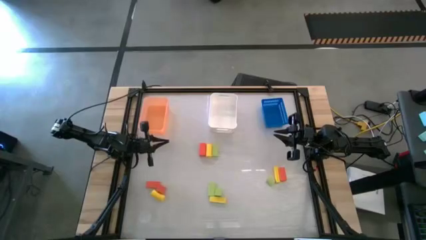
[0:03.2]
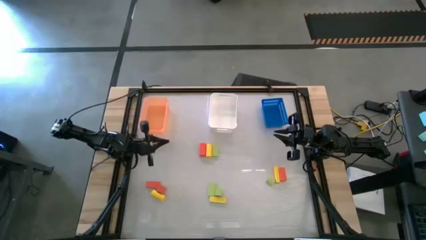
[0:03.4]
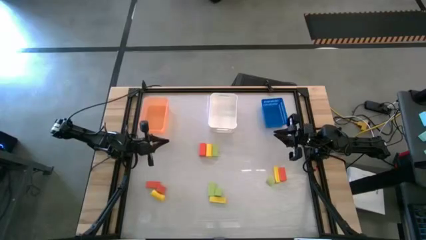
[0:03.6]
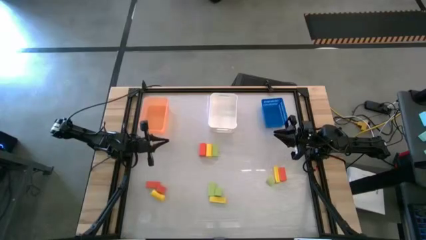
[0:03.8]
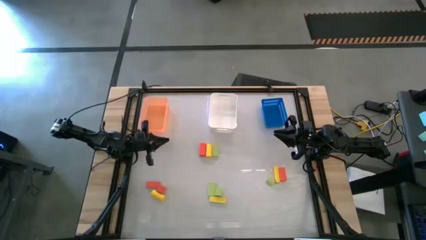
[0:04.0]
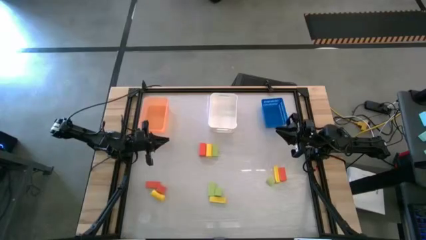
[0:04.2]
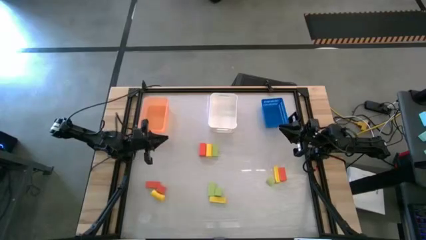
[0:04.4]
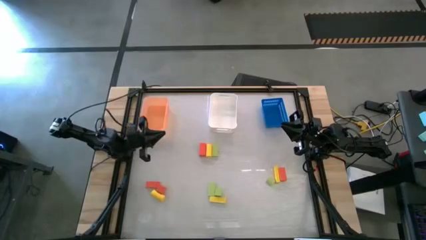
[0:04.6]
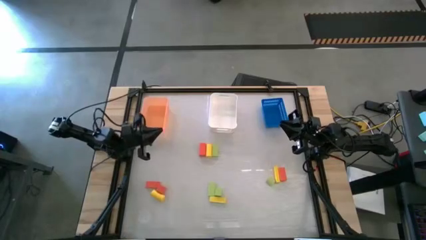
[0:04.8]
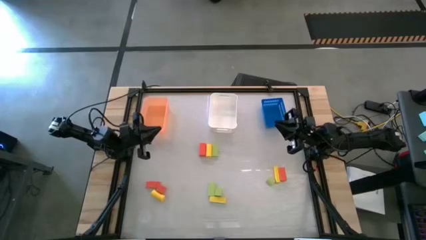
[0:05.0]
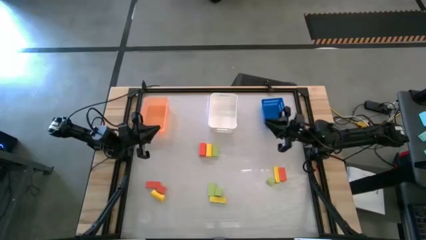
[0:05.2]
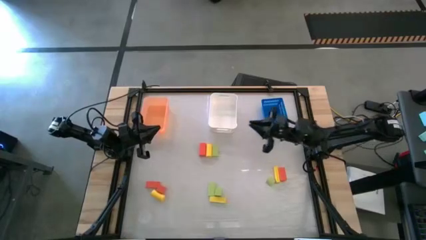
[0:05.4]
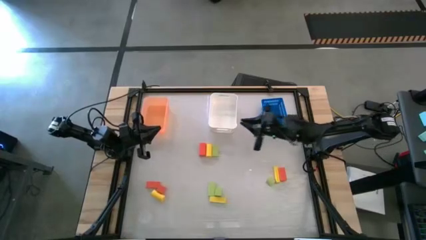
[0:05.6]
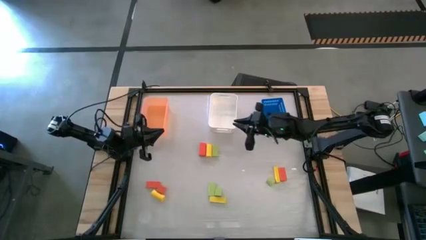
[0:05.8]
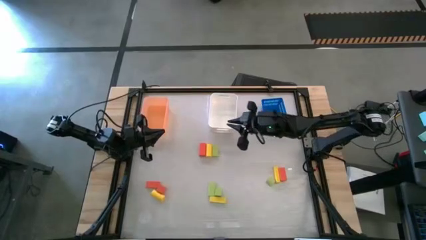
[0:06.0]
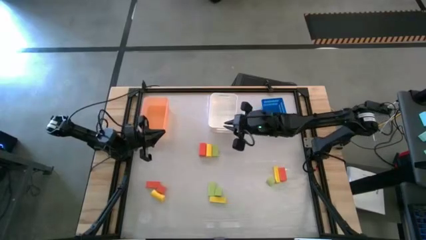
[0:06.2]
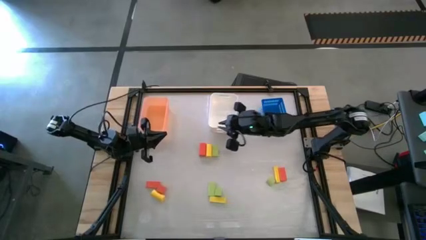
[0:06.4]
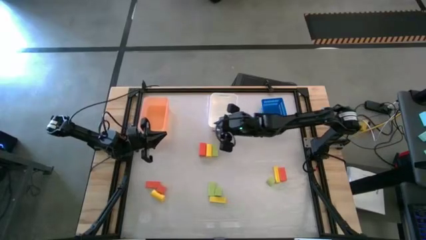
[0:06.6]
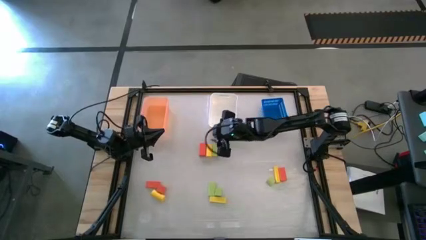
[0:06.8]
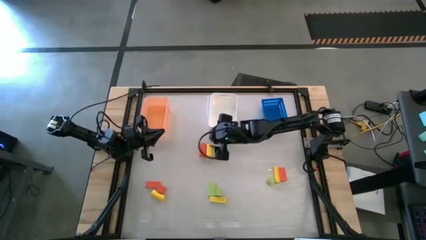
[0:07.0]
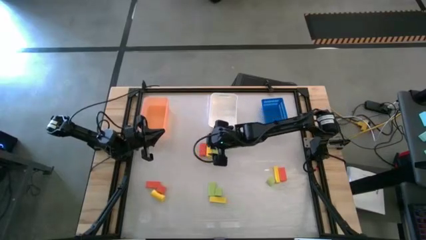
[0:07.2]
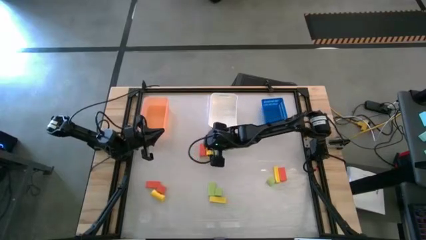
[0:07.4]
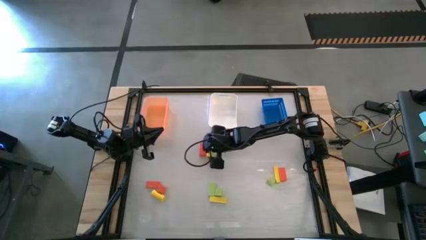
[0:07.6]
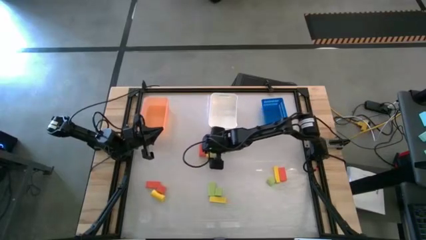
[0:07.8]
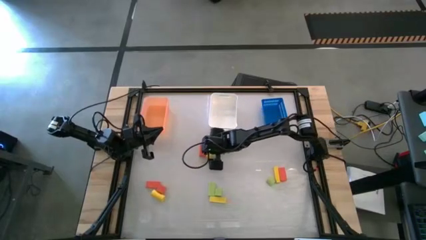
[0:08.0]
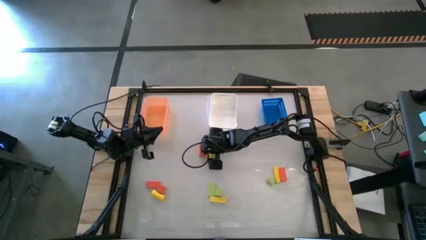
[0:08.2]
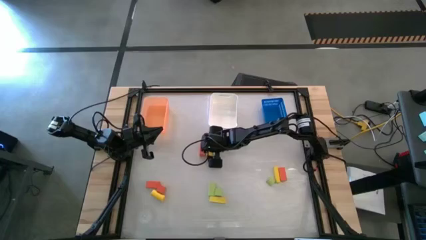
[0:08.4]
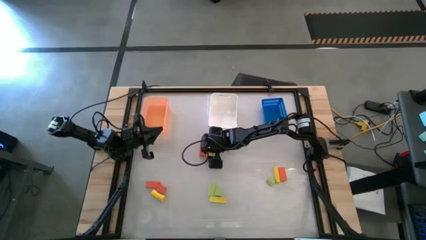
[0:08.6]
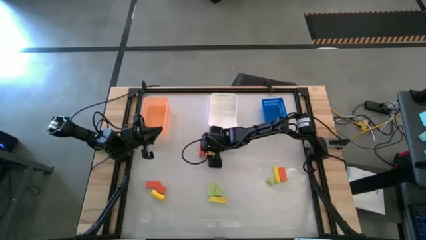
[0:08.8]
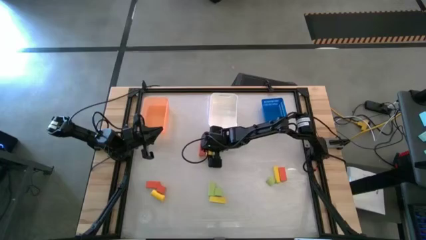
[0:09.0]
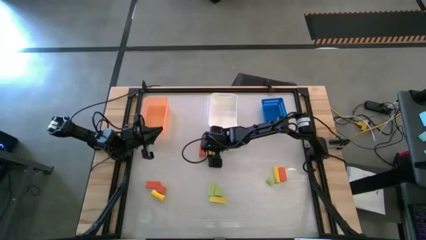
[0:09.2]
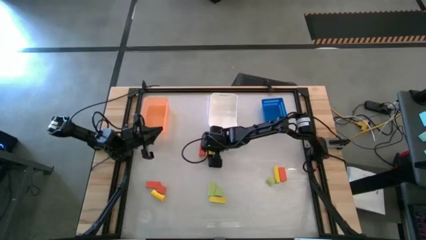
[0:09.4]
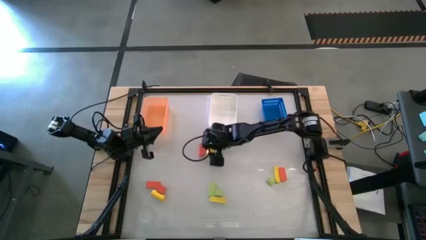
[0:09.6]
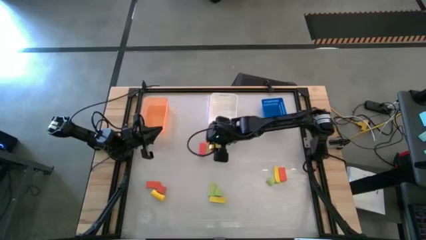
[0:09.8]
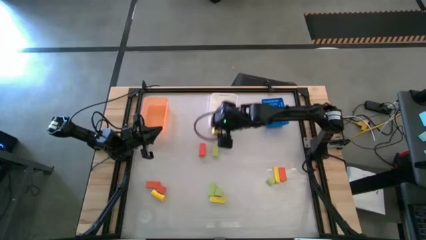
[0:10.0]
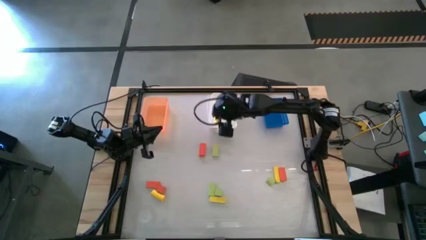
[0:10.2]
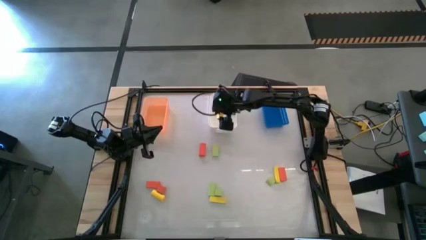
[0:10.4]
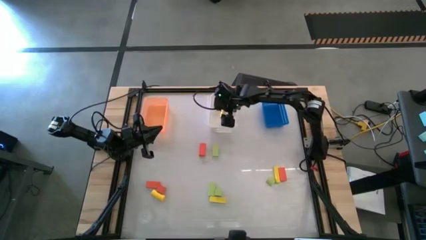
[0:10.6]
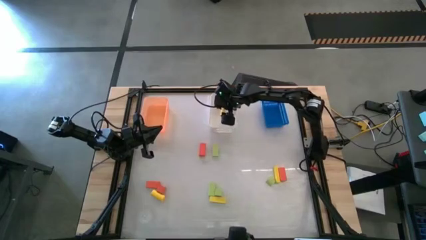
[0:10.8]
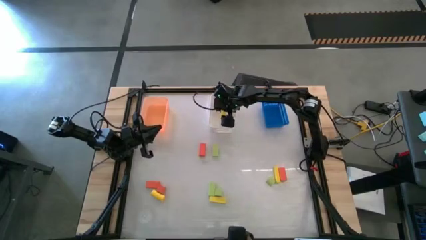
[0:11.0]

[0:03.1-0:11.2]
Task: Sort & place blocks by color
Put the top center yellow block into the white bin

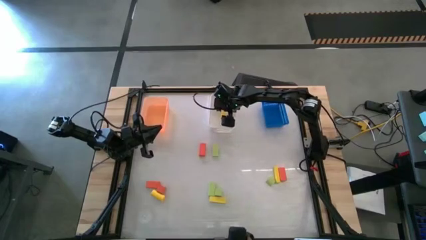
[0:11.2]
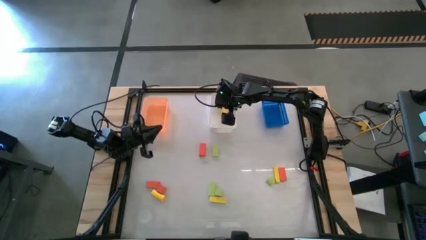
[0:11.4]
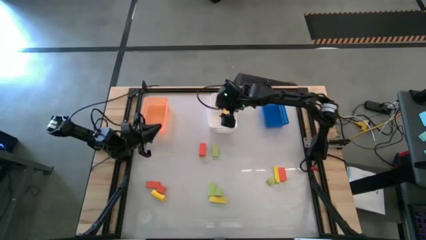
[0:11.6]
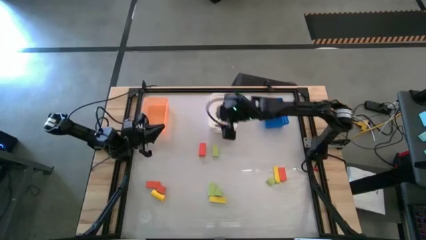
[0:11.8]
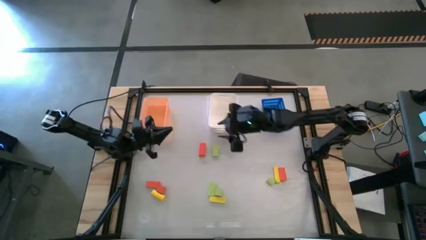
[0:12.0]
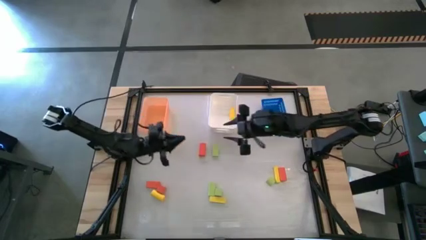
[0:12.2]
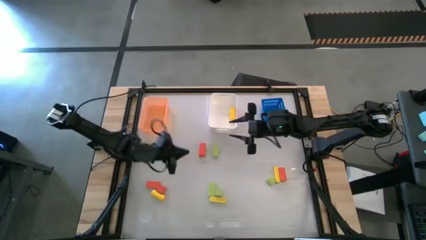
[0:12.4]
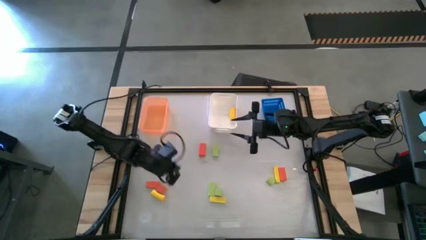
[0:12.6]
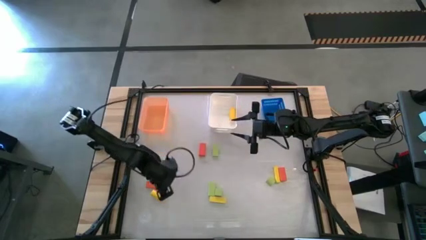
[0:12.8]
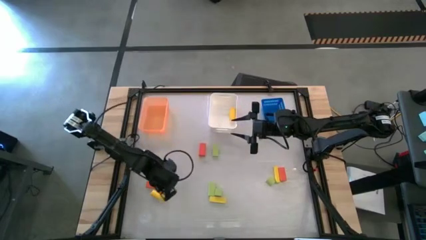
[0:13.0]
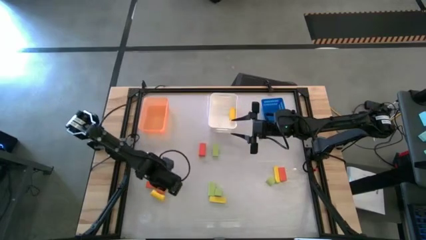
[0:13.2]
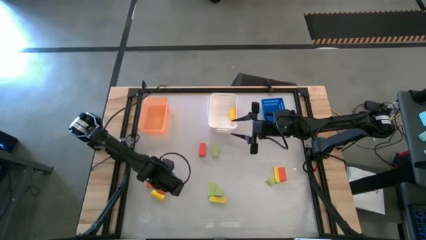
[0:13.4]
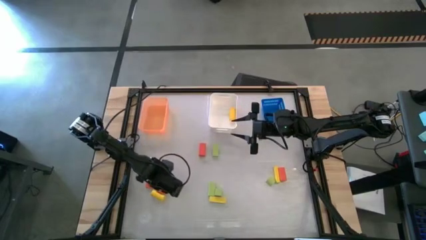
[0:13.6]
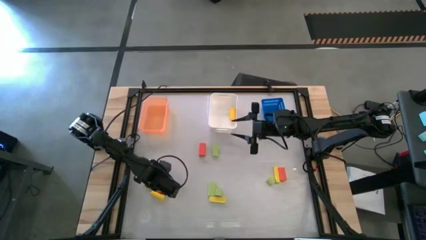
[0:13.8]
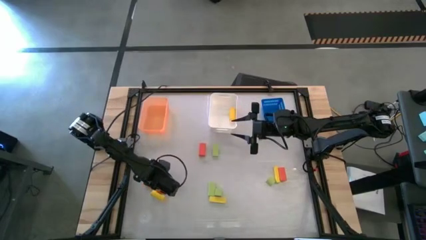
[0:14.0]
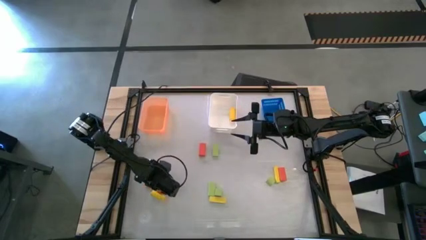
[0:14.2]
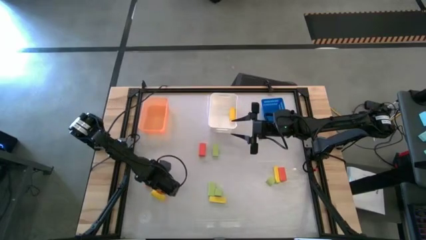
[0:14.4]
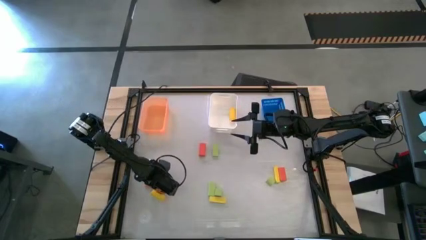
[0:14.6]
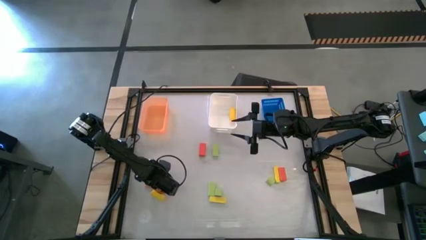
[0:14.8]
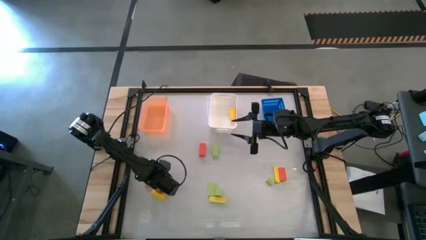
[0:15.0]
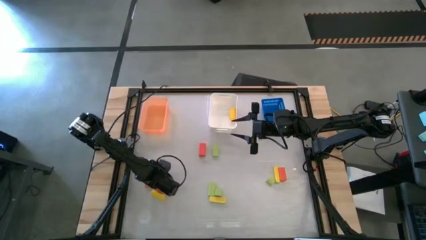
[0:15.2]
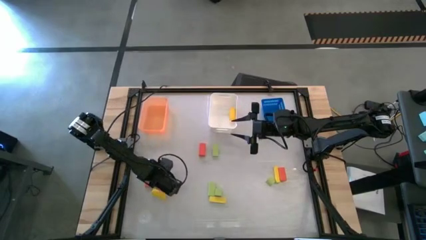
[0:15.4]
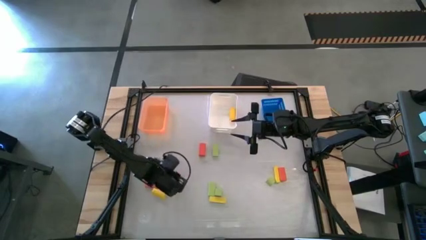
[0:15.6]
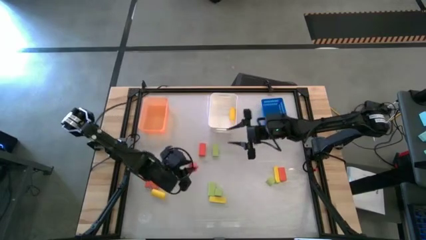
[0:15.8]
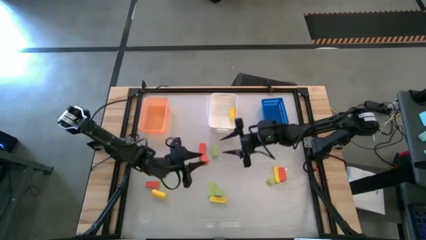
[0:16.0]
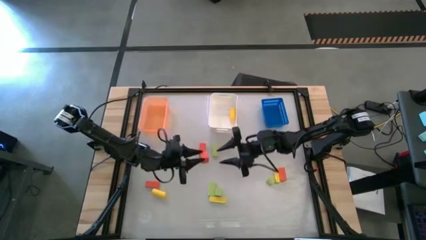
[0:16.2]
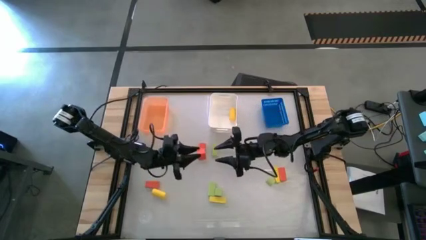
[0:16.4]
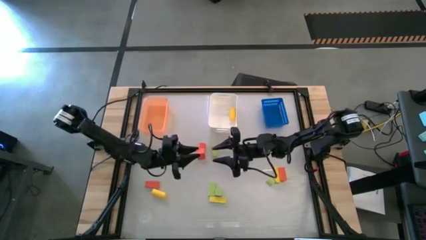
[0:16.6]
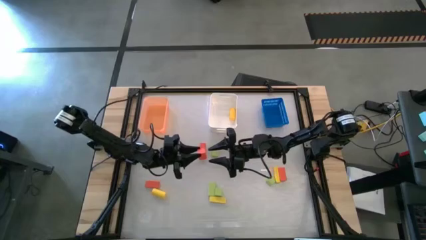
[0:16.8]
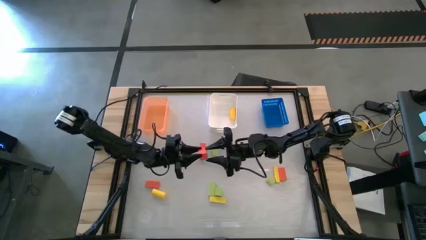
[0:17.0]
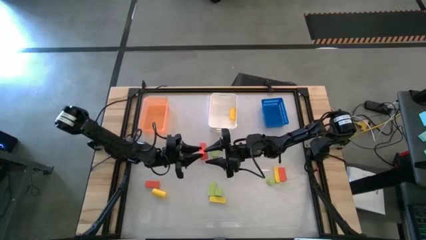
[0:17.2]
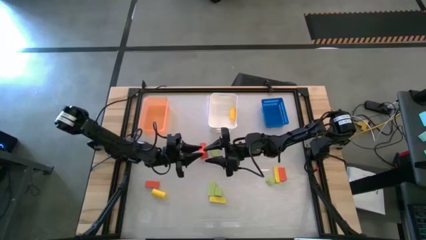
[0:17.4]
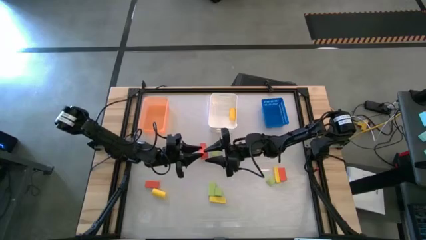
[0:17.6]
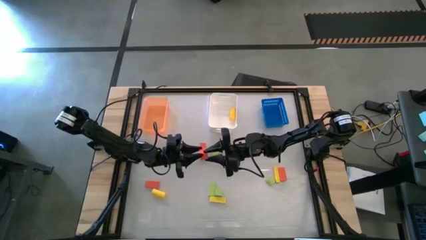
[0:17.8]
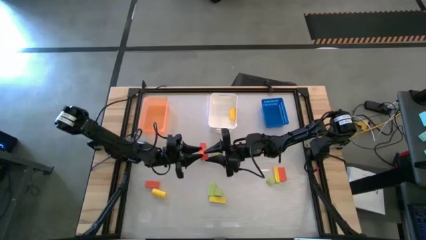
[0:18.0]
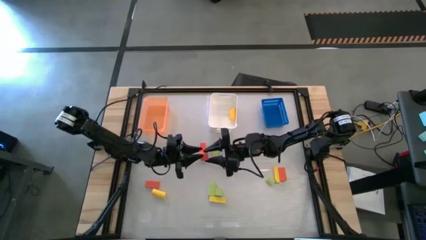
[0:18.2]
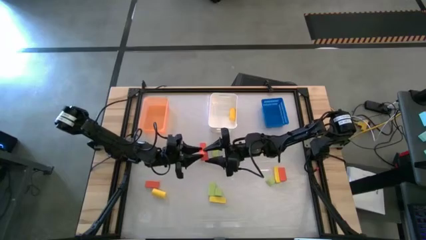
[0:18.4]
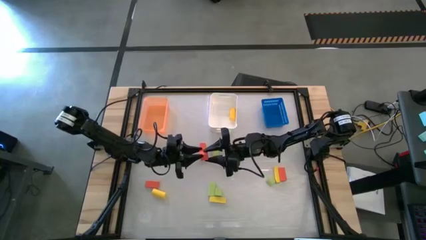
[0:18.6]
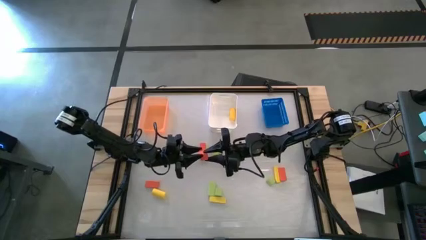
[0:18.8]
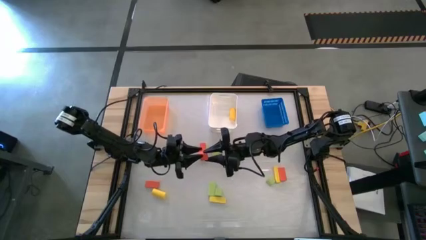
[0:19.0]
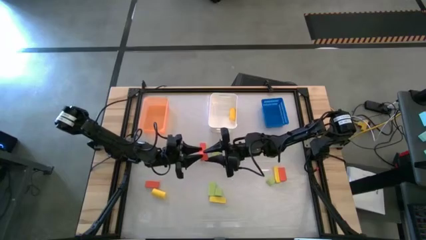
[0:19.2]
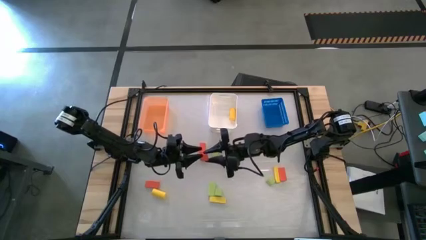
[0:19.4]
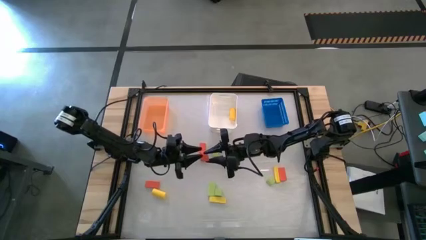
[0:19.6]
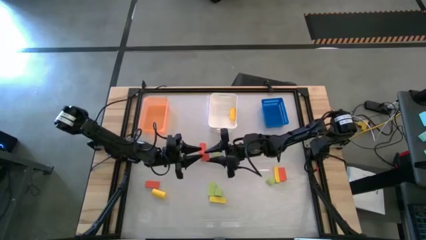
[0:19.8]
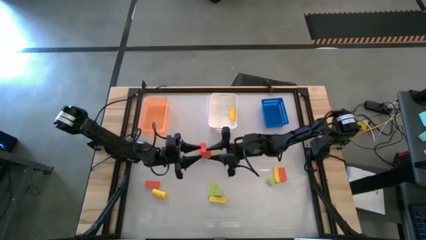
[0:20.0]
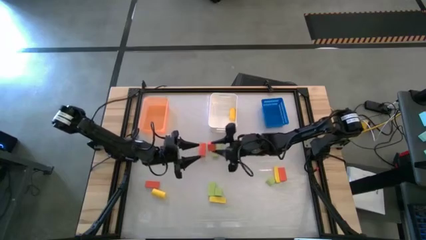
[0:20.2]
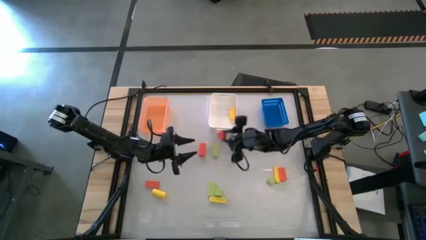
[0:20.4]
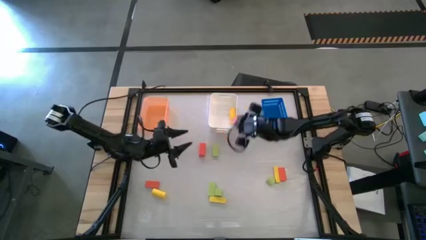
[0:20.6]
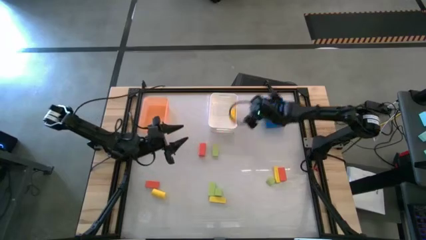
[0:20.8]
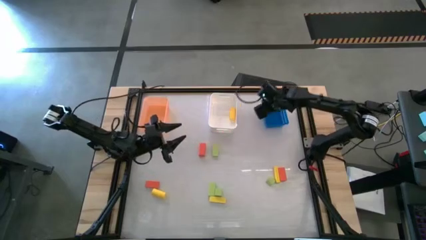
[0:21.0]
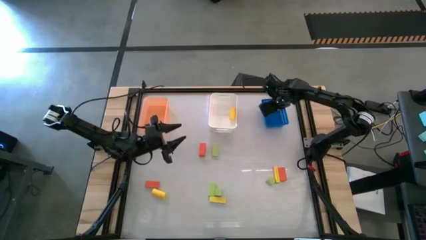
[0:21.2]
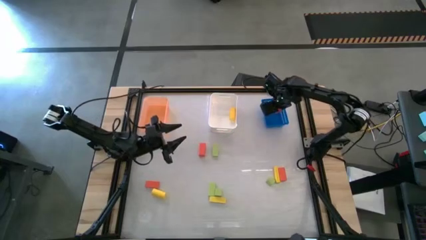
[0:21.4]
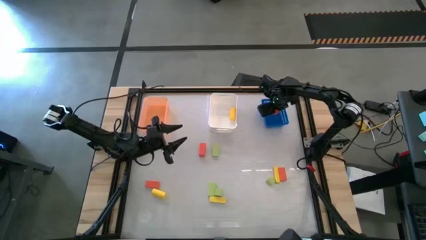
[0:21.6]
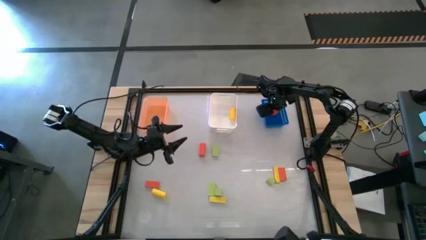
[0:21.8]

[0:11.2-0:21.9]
Put the bottom left orange block into the blue bin
